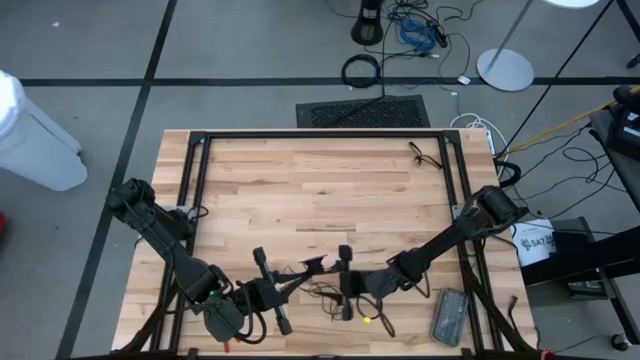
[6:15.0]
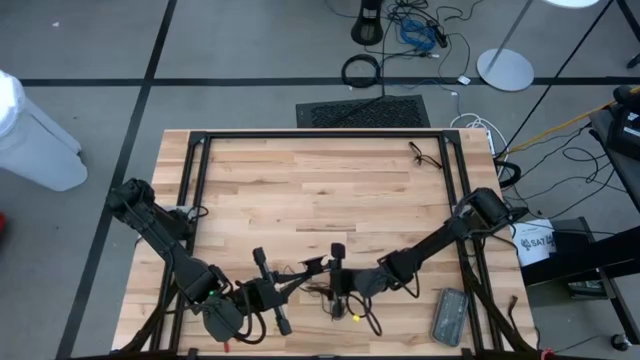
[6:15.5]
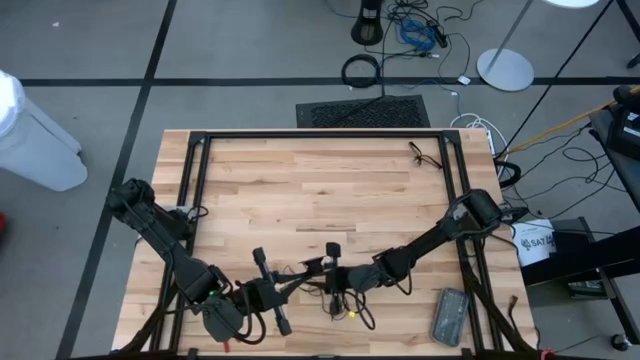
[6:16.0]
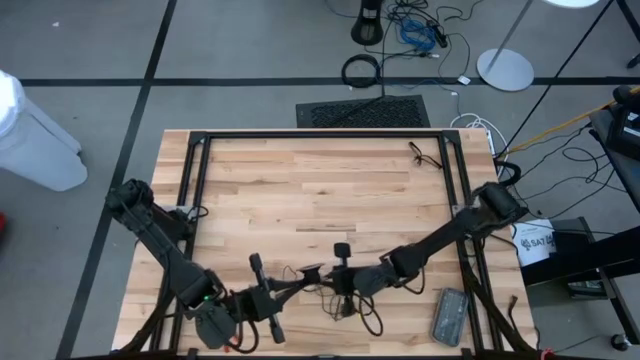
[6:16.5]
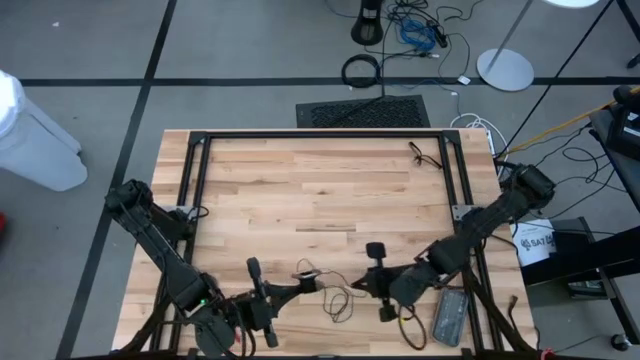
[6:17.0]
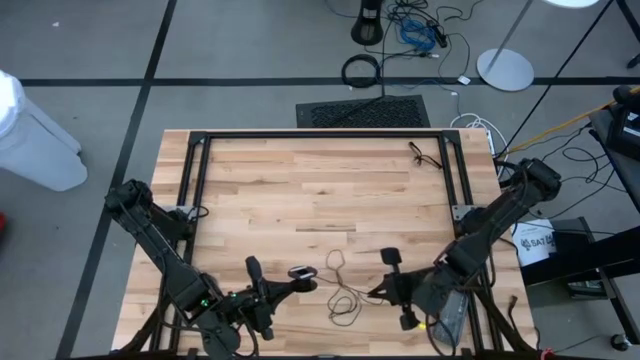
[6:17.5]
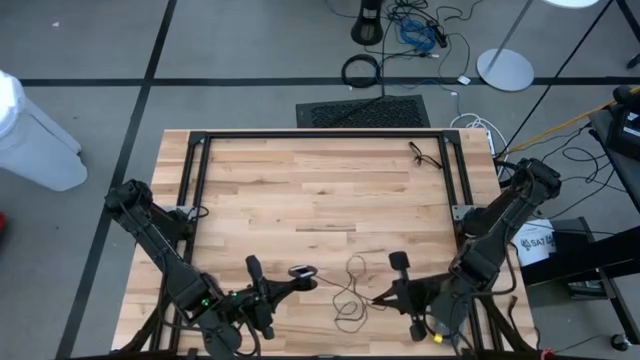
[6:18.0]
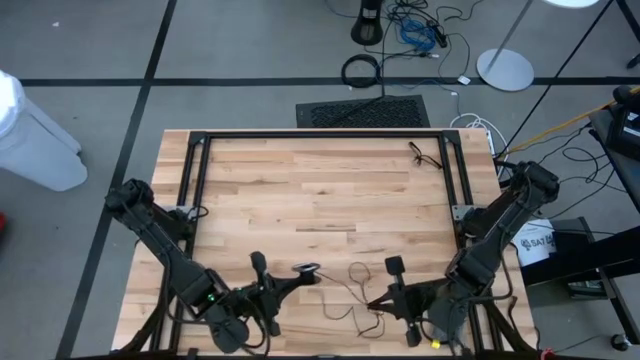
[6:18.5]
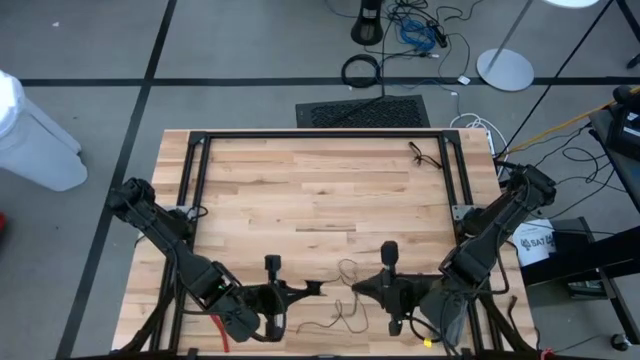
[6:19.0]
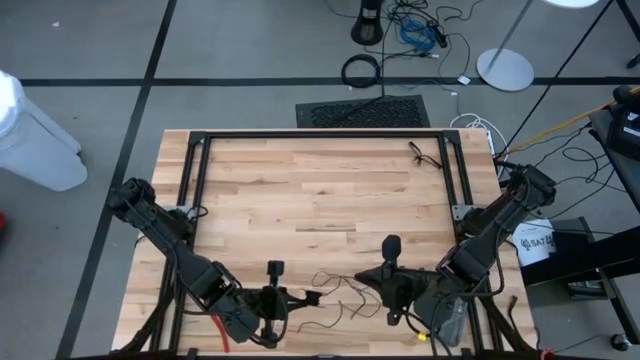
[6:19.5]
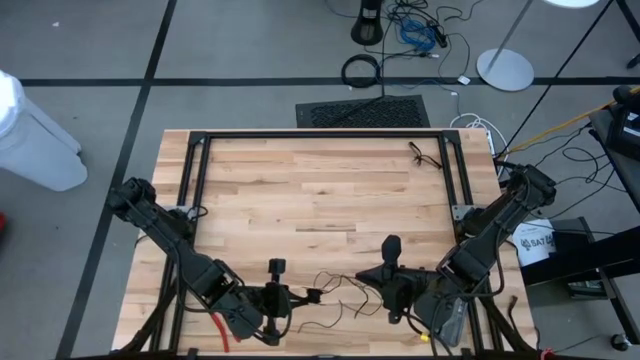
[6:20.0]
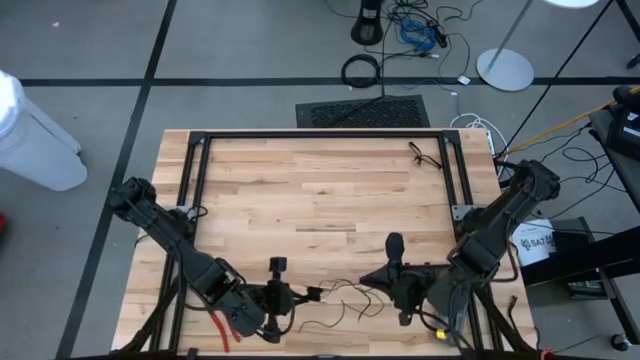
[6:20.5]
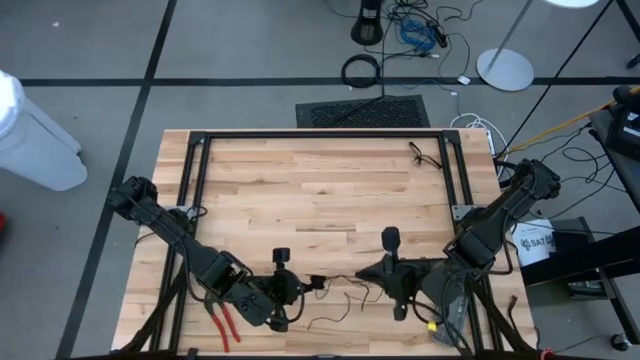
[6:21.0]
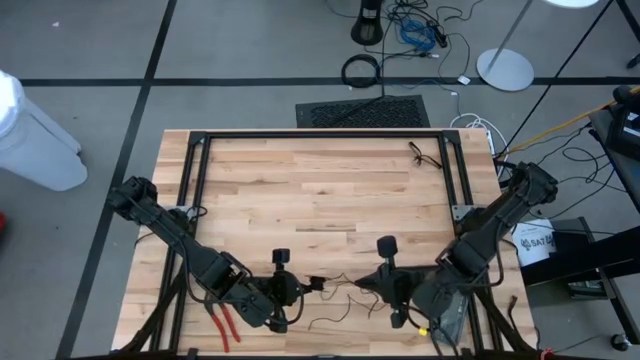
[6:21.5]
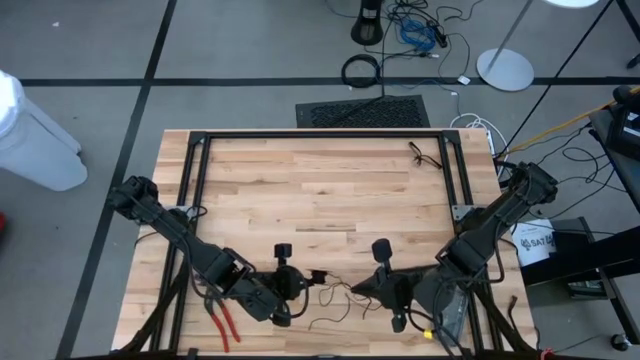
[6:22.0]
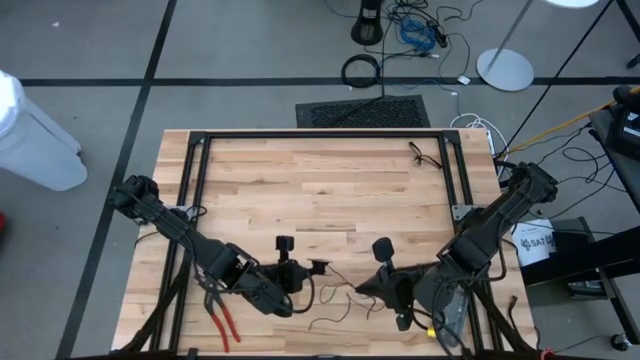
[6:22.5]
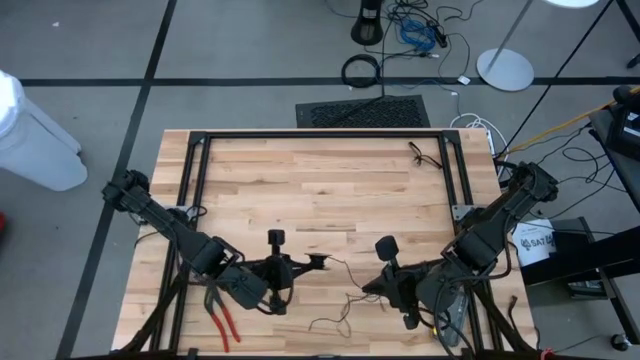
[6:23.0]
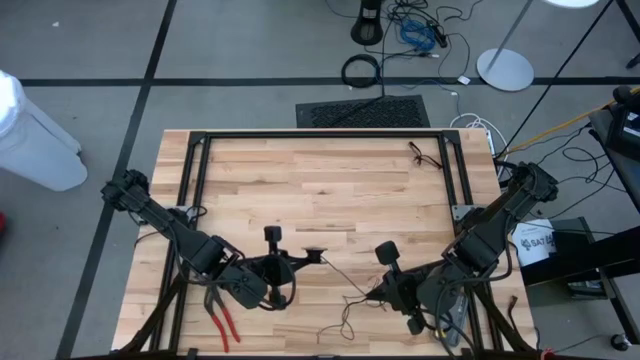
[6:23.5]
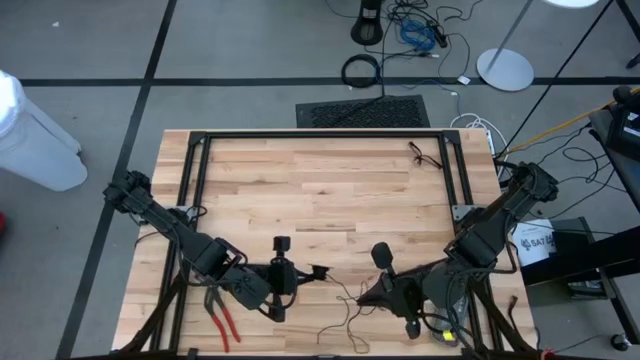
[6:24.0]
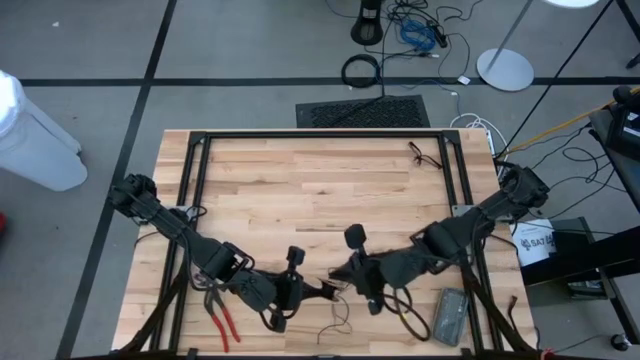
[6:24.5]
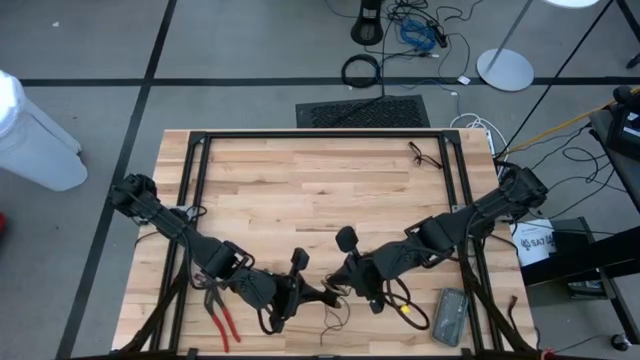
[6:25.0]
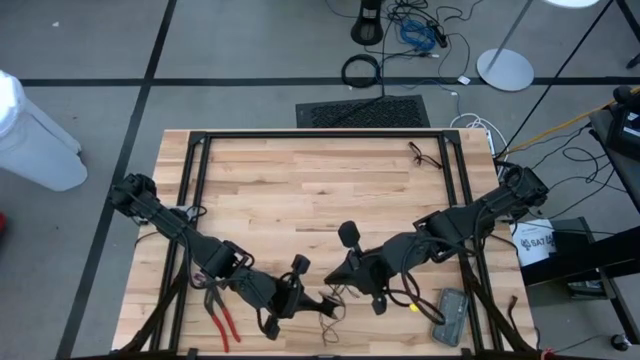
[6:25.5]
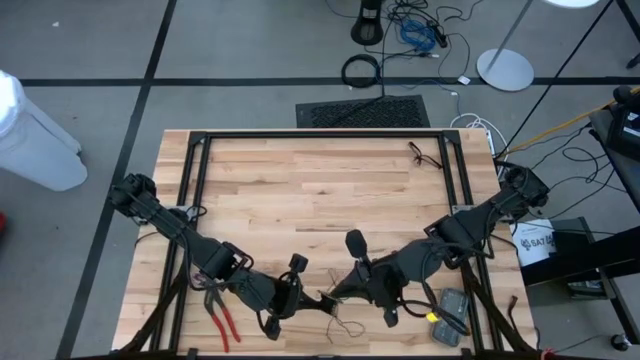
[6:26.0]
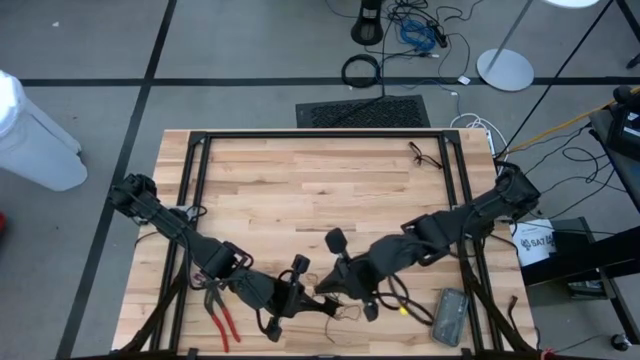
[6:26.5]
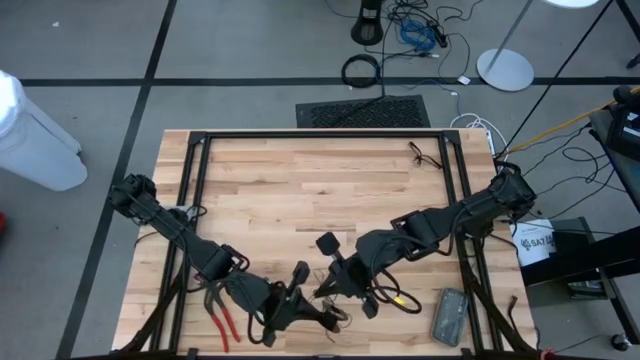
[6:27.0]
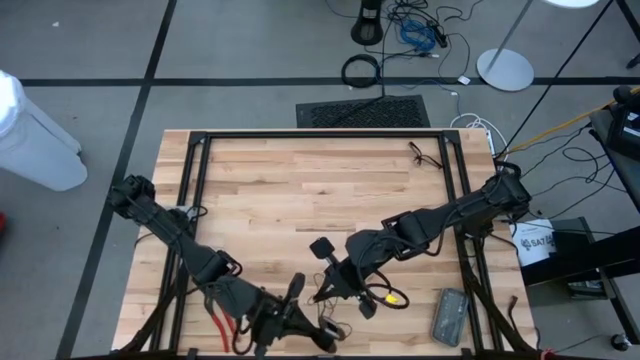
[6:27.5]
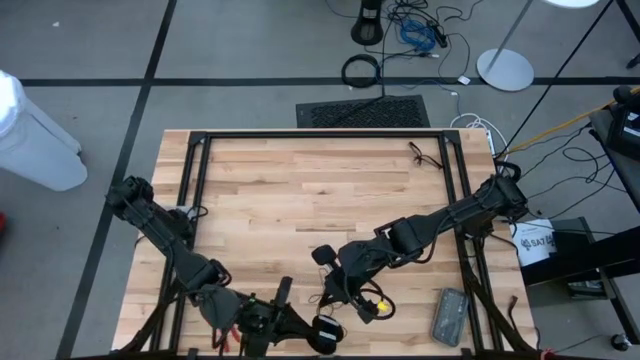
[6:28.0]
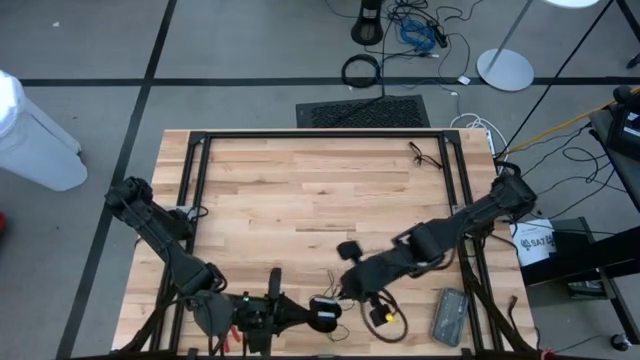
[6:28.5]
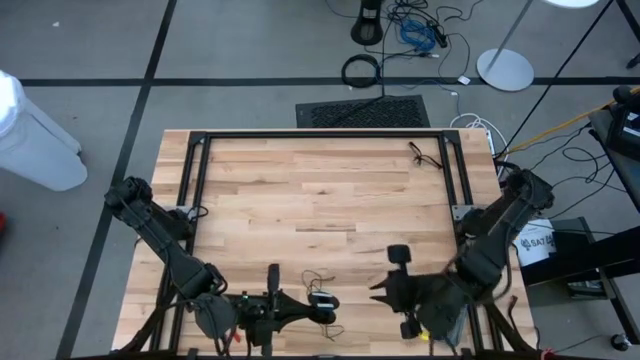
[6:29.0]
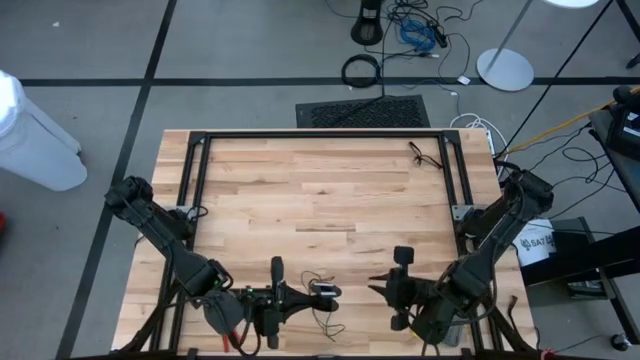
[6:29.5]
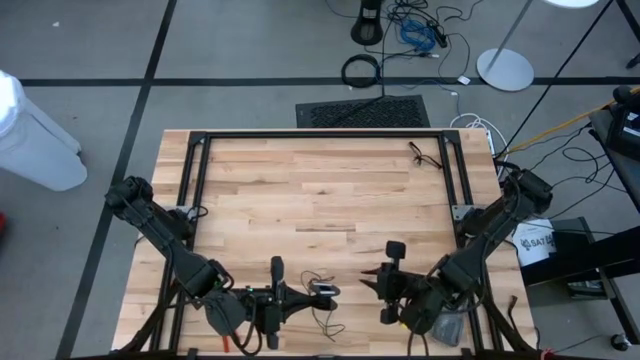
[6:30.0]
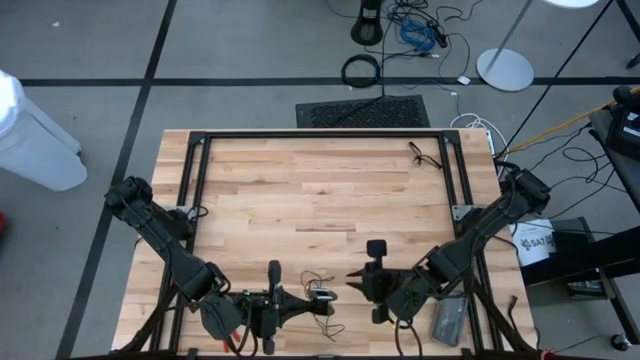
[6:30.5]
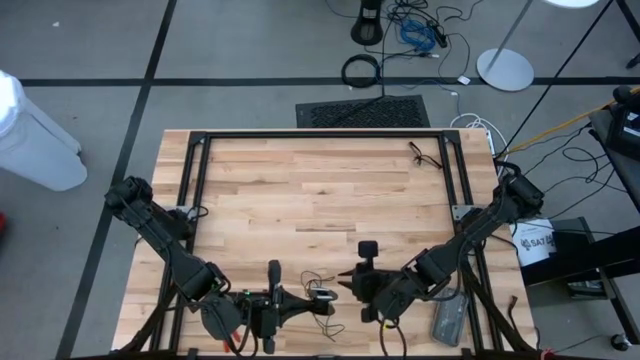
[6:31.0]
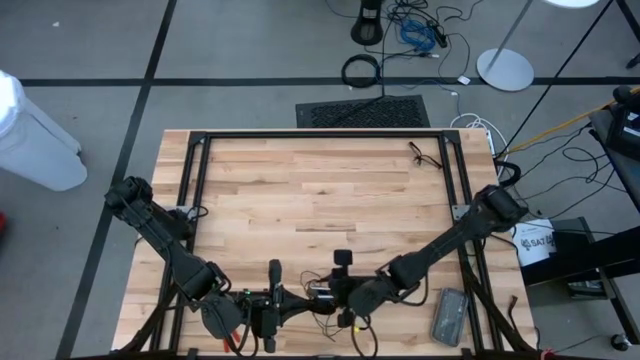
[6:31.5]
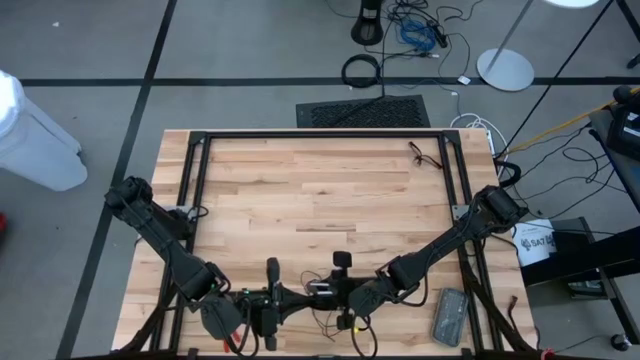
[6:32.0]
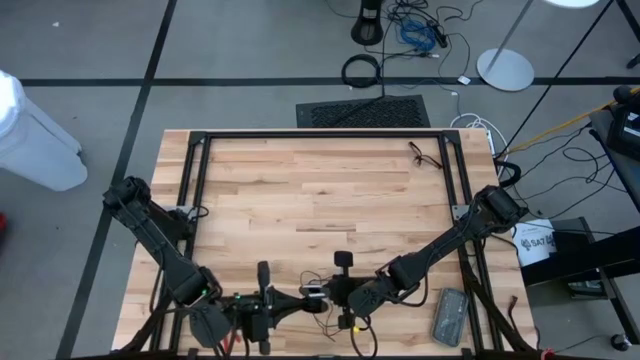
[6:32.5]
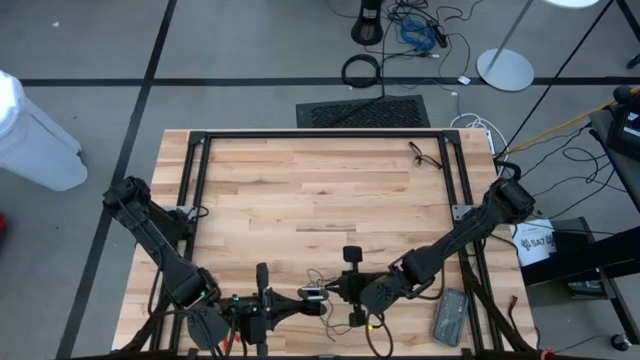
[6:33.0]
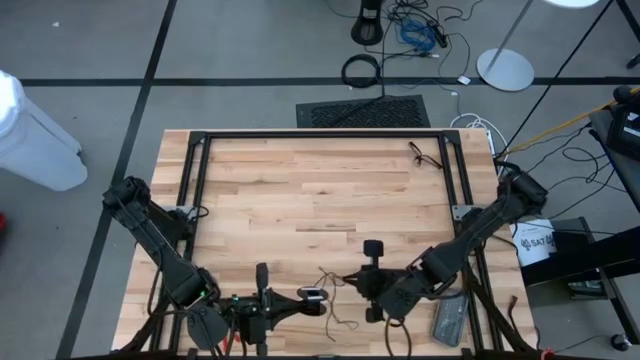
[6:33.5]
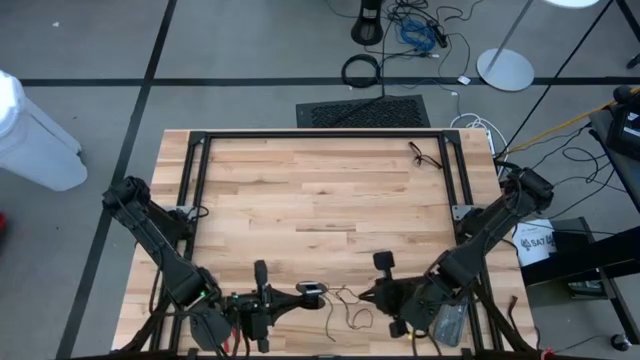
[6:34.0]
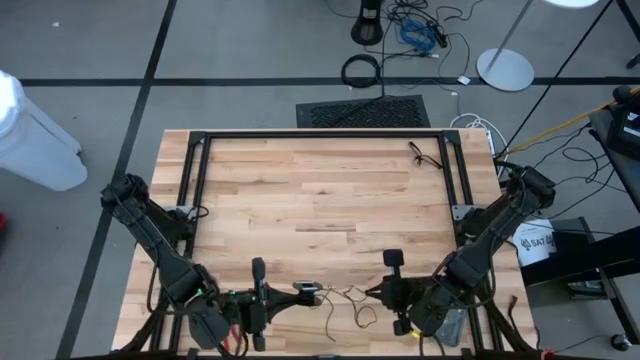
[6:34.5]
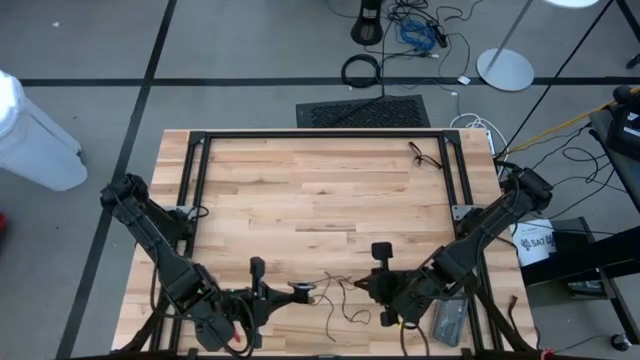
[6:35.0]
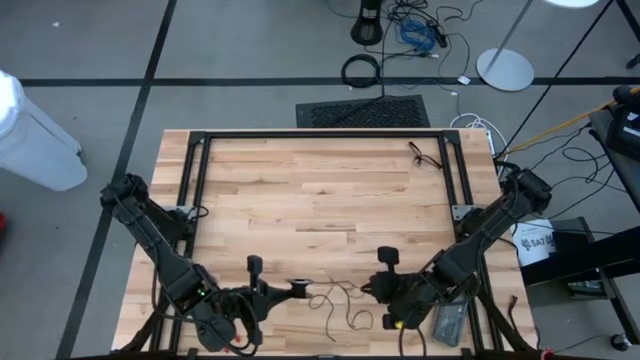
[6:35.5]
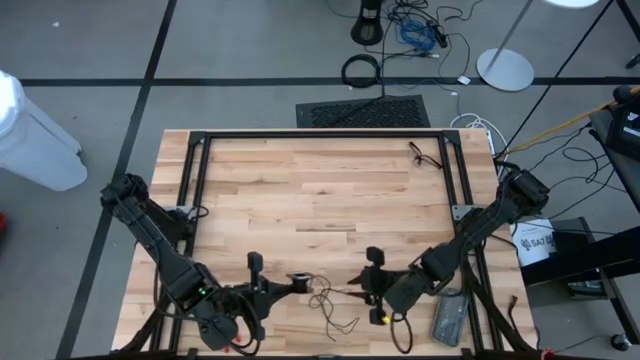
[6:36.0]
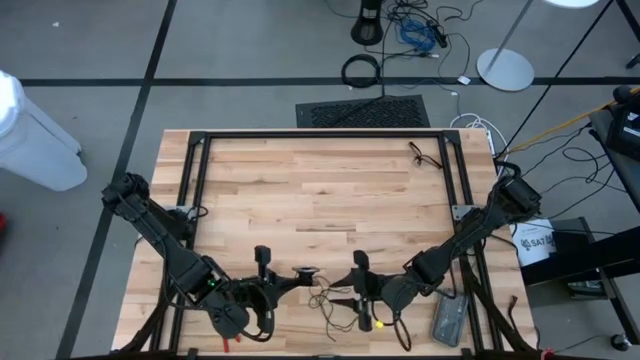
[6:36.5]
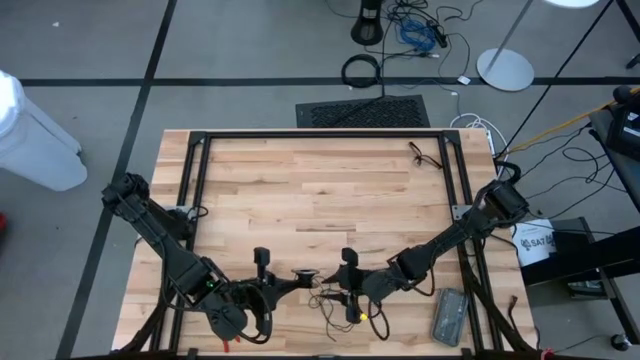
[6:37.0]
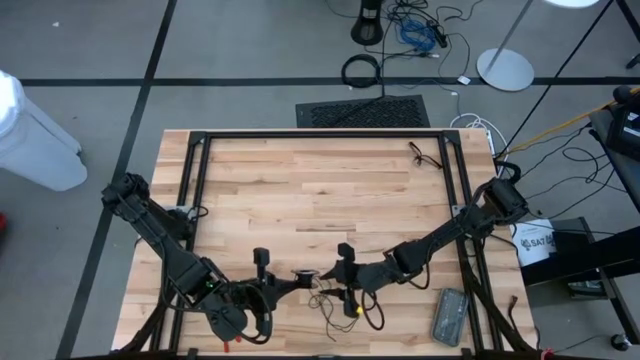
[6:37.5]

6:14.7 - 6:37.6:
Task: Coil cords
Coil the black wire onto the black spool
